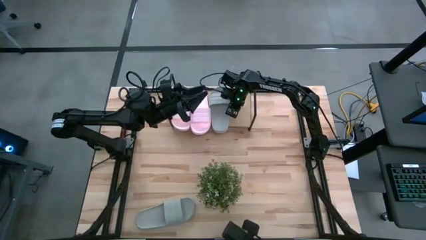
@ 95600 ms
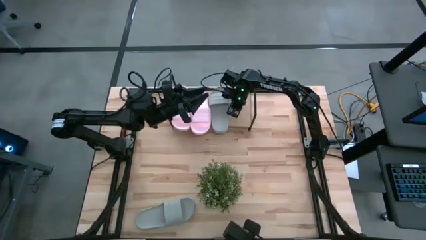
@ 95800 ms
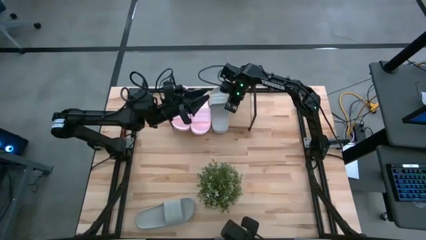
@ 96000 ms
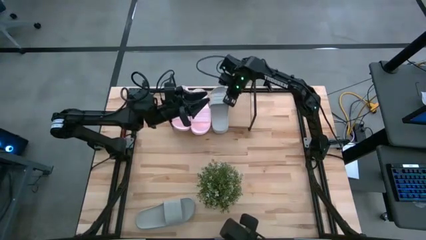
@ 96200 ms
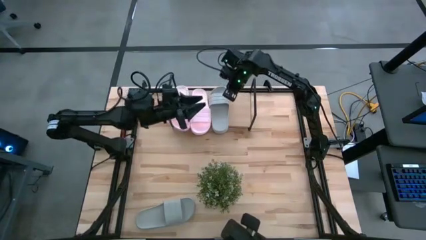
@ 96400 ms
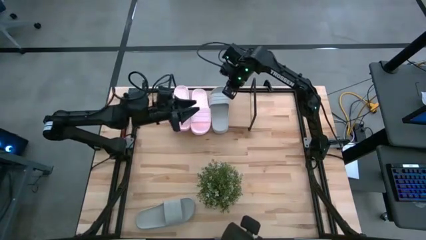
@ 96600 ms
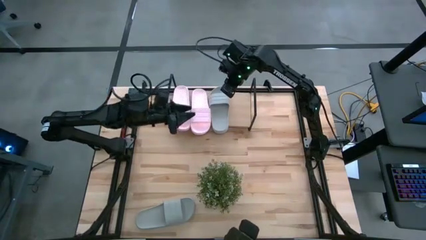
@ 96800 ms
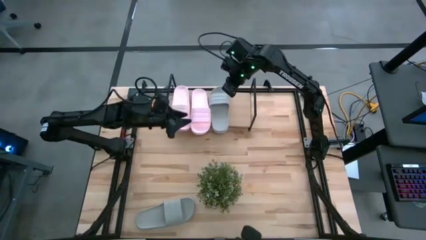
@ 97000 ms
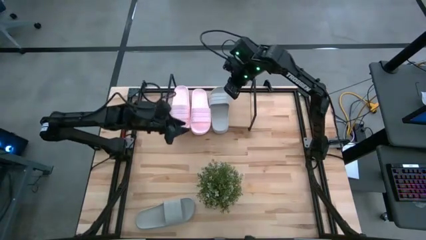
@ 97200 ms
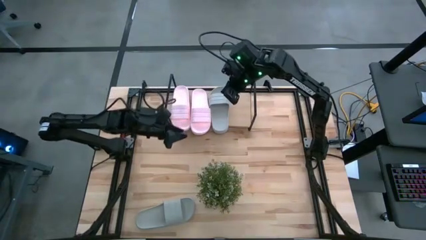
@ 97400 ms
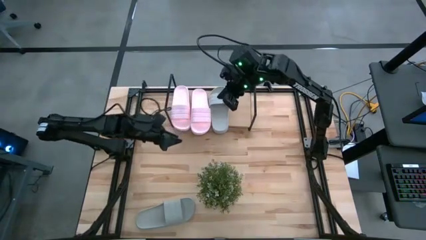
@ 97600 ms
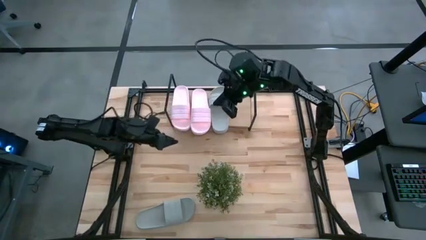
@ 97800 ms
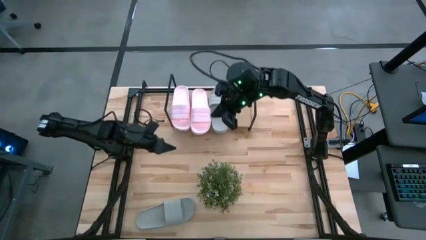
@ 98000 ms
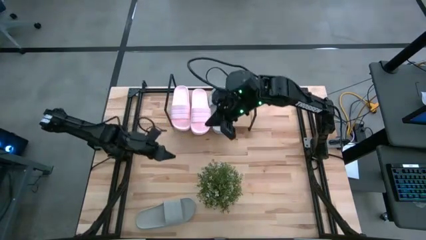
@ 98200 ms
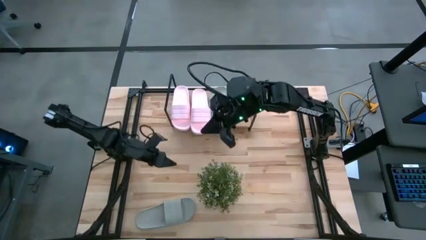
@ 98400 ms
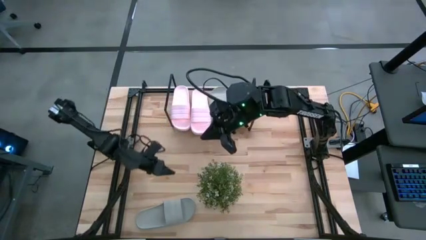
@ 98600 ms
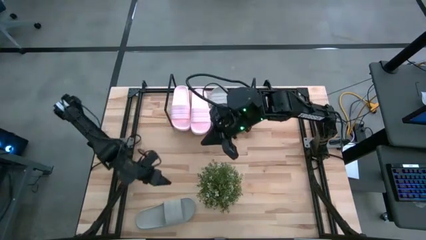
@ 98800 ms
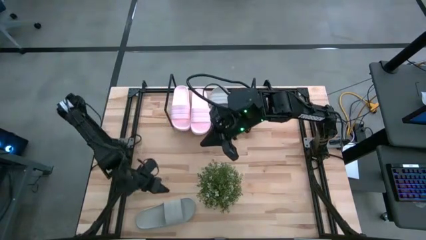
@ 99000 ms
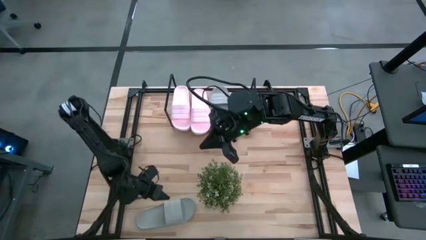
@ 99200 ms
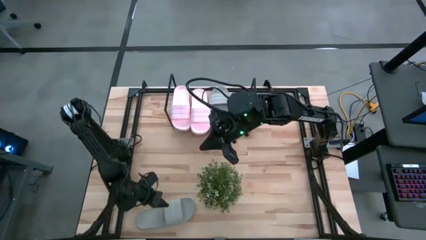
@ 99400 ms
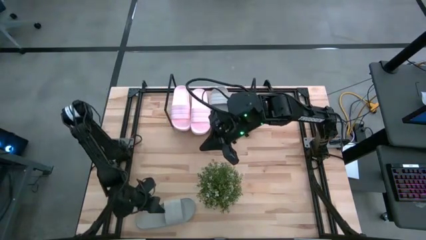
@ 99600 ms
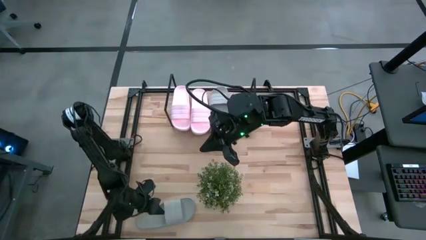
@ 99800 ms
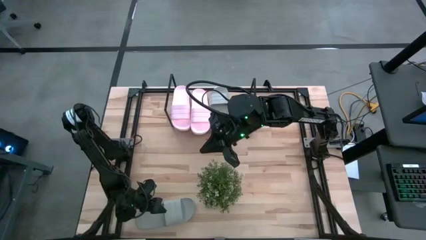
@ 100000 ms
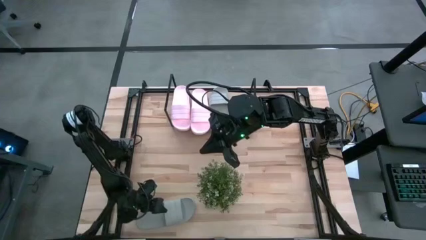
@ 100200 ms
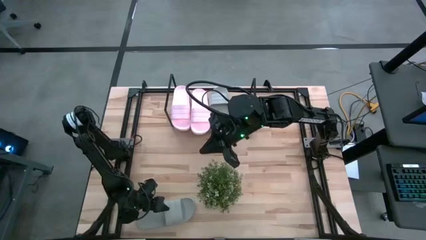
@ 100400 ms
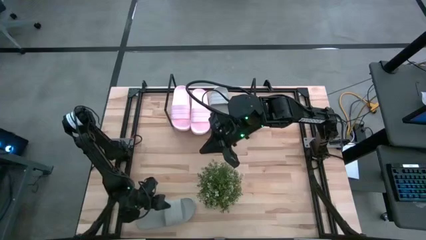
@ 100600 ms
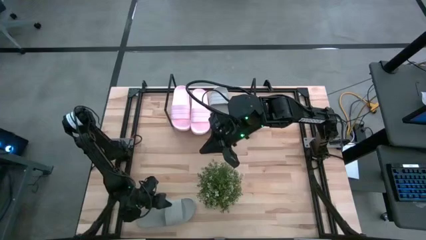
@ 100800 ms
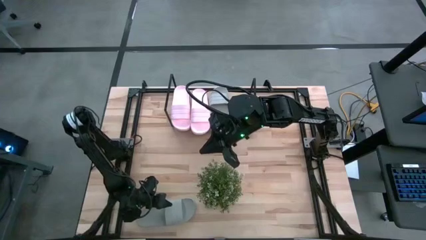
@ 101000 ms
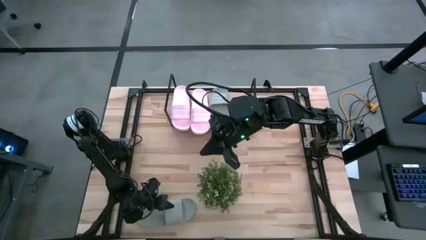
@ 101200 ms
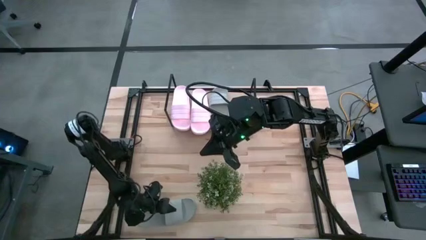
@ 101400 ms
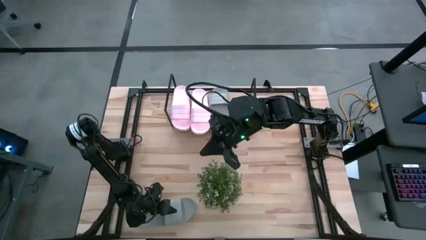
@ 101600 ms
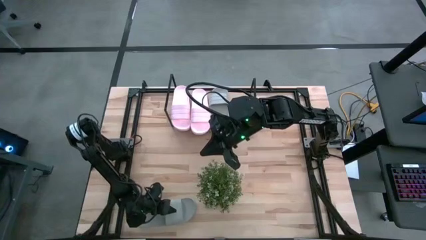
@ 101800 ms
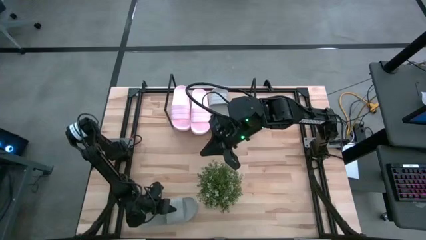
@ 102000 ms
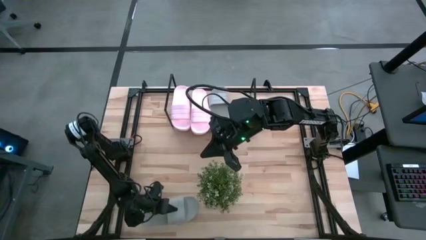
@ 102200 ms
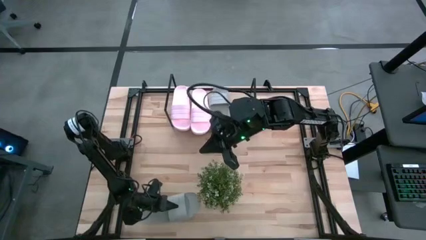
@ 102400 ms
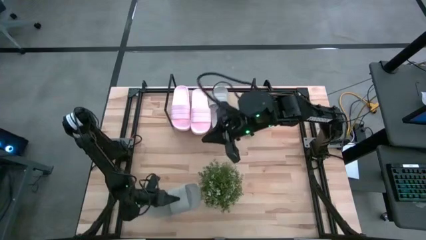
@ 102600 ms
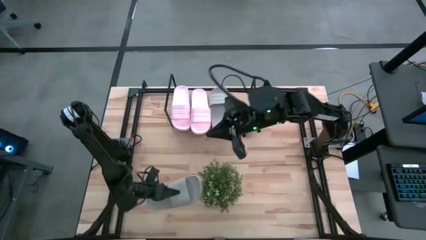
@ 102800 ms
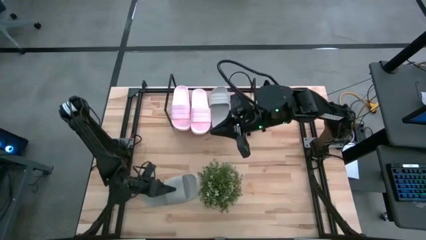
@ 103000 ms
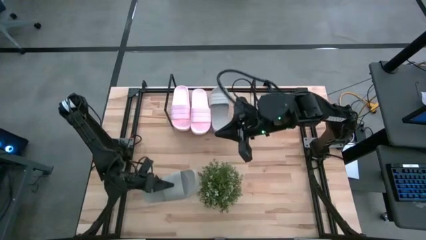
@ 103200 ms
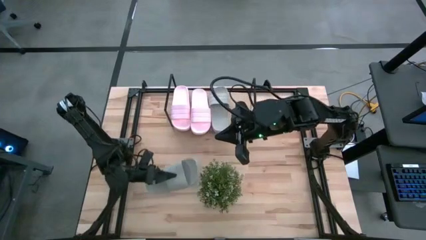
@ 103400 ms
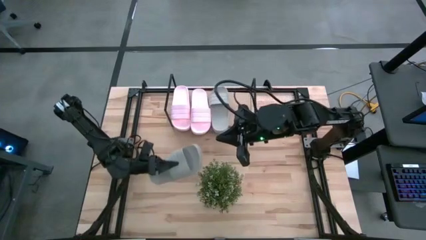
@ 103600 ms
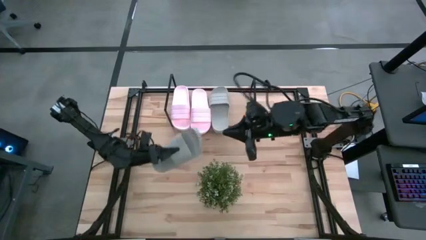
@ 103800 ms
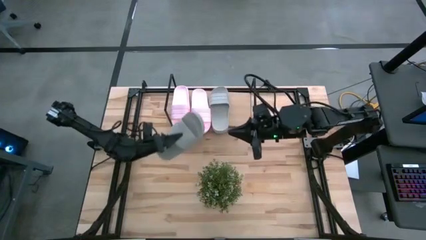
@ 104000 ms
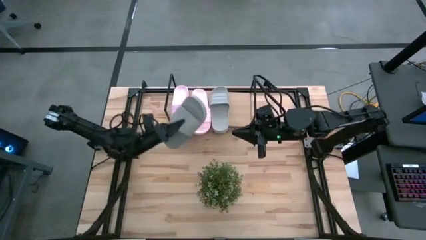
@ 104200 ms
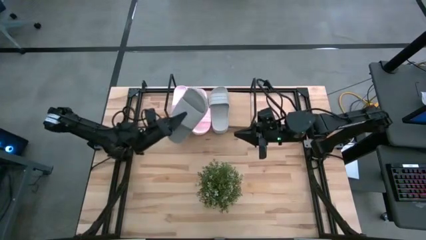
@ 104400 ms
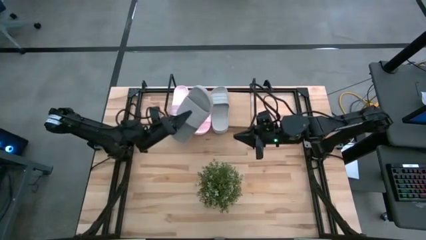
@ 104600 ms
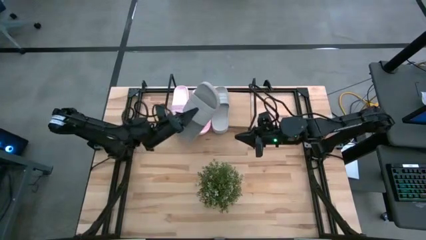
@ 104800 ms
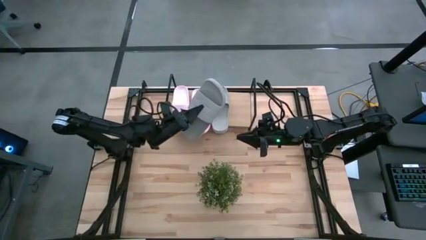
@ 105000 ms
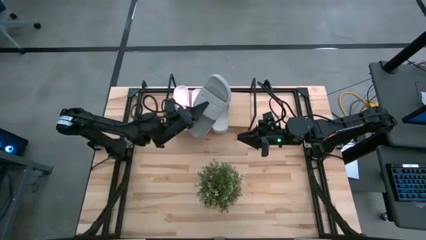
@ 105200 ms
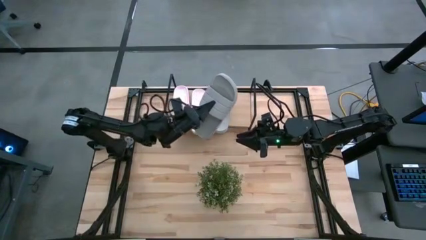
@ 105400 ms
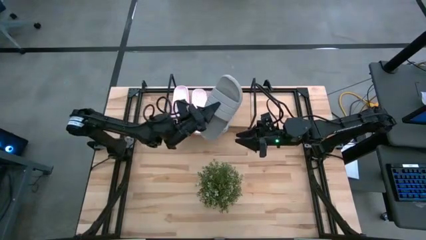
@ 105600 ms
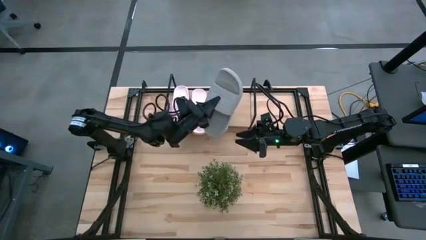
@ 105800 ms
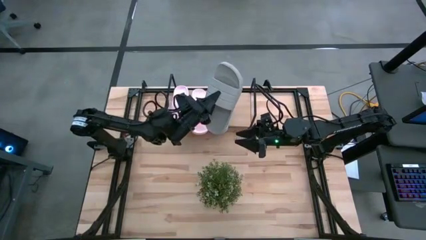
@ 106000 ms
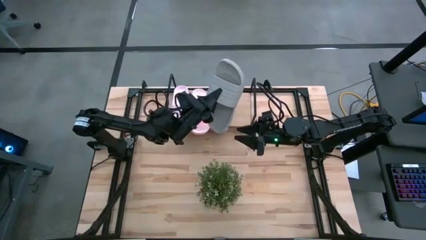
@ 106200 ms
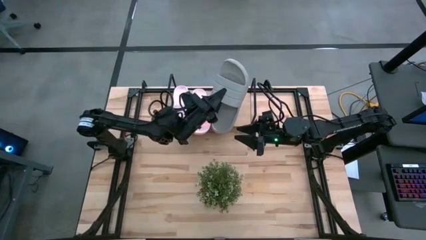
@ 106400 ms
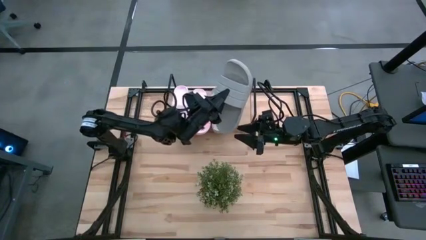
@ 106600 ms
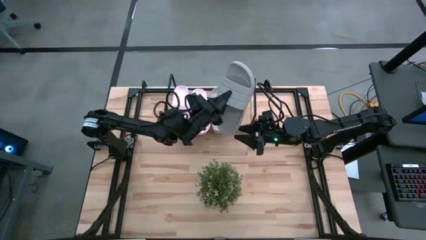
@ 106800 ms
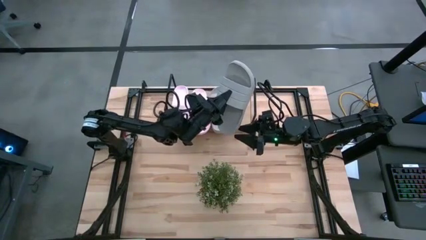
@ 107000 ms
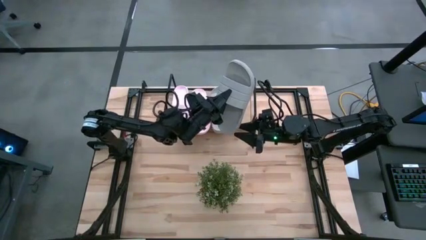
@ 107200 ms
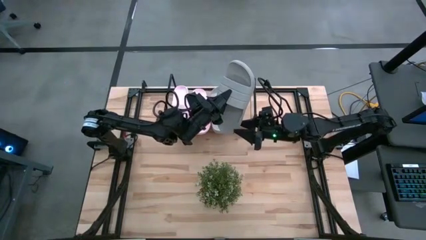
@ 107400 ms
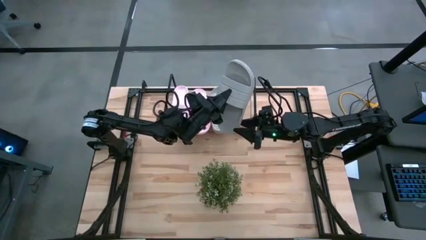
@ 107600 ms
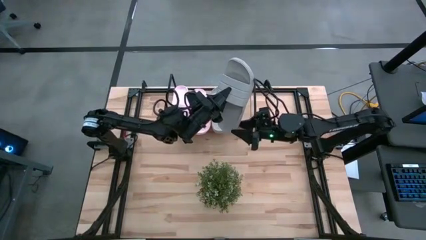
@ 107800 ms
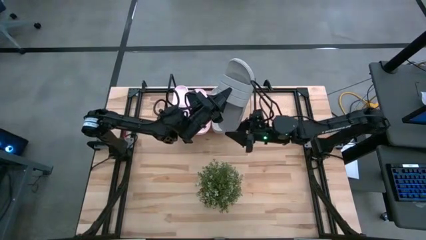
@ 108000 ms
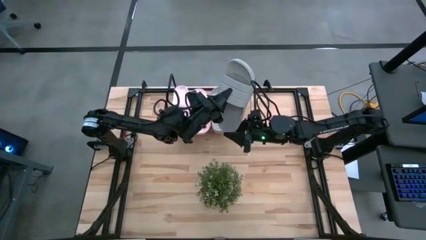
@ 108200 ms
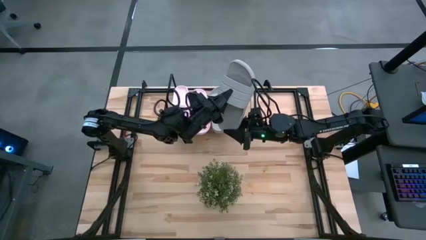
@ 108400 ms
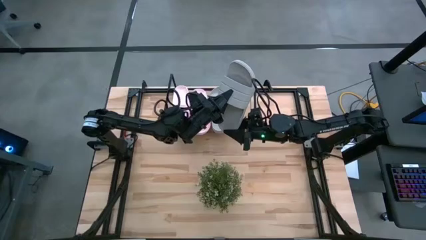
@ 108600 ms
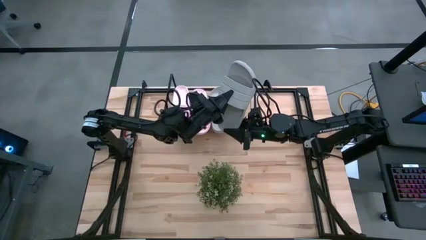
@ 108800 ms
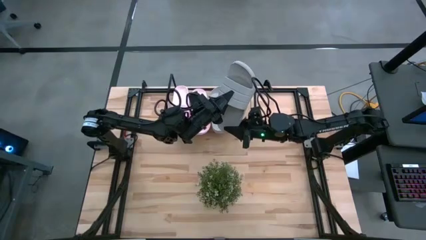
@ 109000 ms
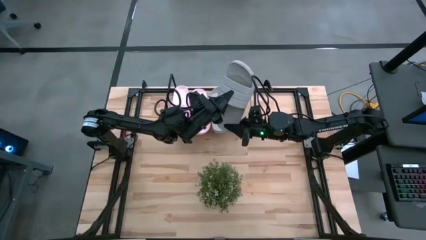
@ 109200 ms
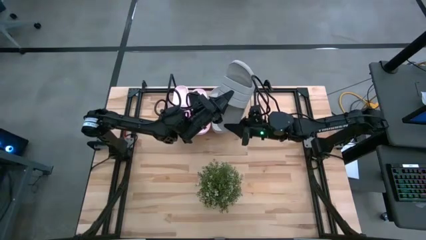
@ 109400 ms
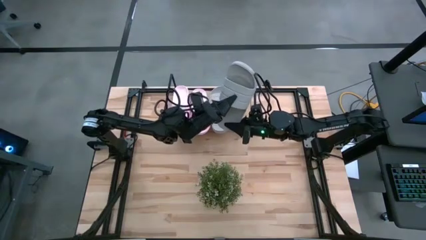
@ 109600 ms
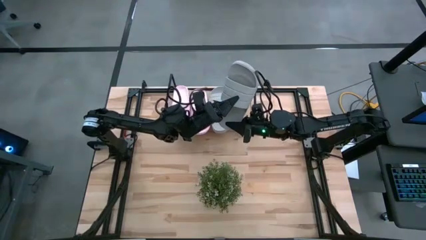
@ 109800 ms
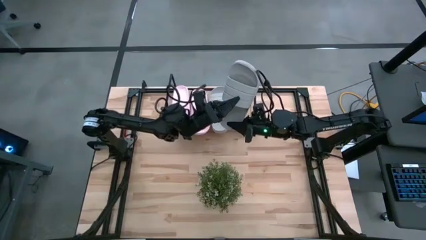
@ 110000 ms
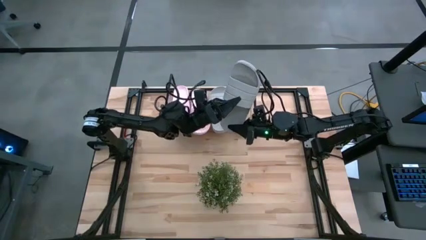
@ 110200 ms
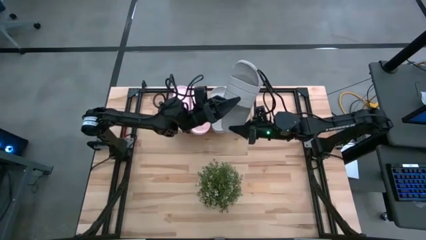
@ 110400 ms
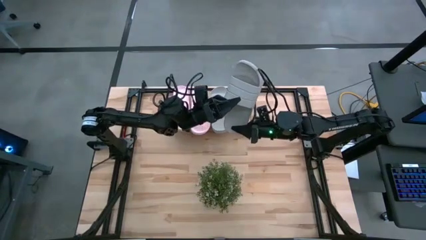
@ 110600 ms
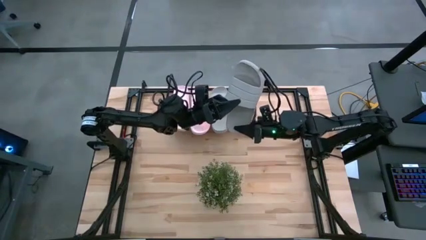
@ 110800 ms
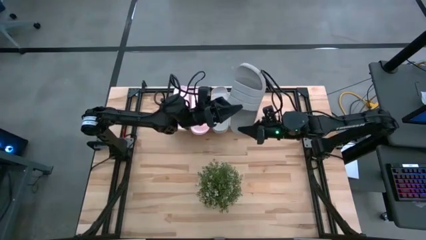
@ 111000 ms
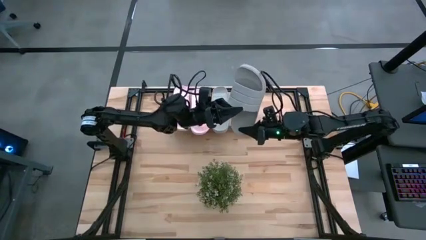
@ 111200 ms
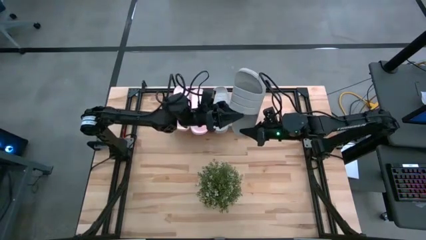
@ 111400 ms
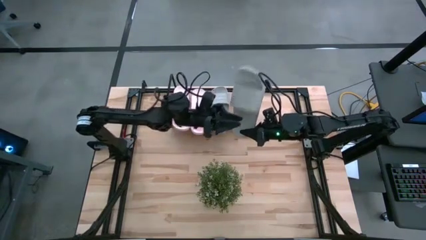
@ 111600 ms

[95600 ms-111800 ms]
Task: Pick and place slides into the shelf
Put the gray slide on the shelf

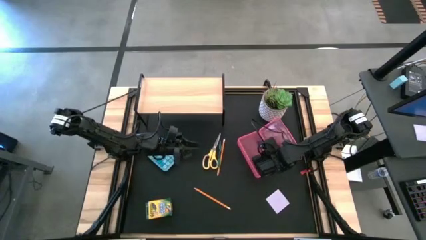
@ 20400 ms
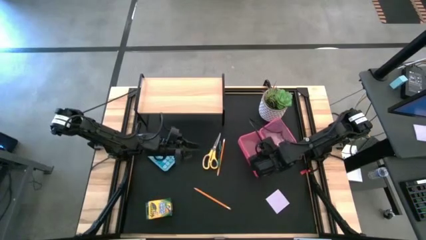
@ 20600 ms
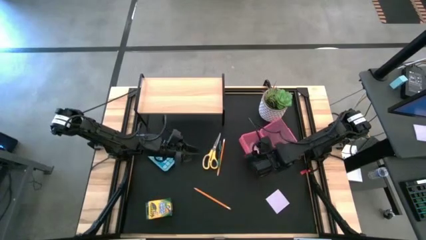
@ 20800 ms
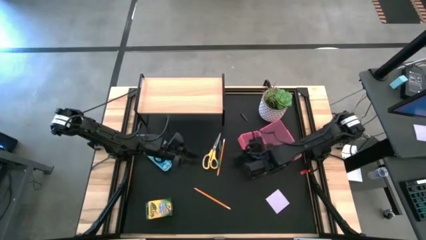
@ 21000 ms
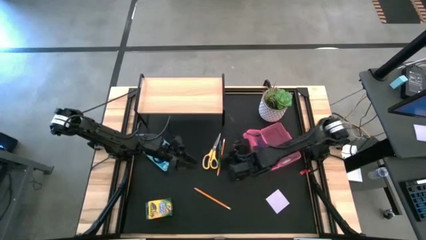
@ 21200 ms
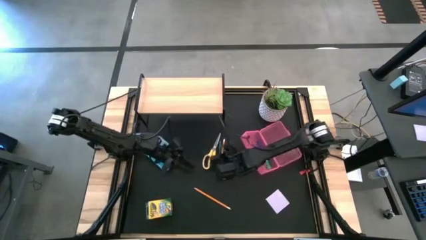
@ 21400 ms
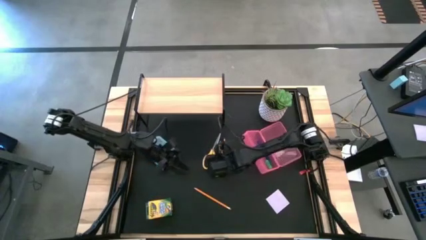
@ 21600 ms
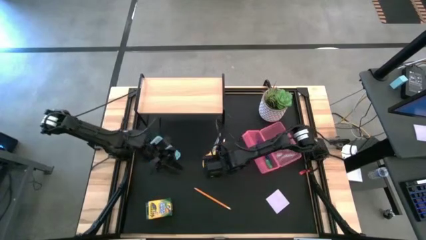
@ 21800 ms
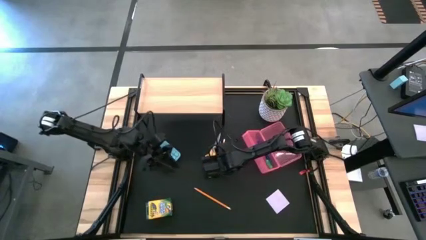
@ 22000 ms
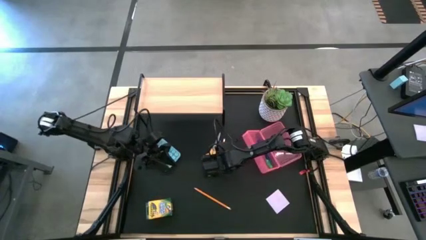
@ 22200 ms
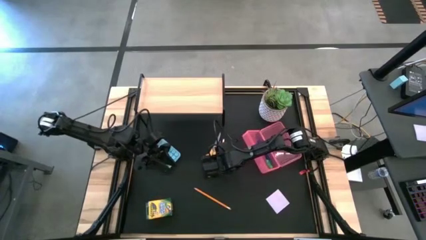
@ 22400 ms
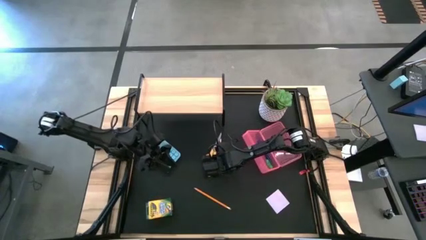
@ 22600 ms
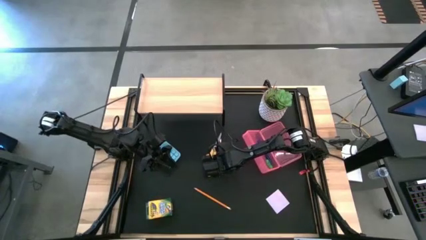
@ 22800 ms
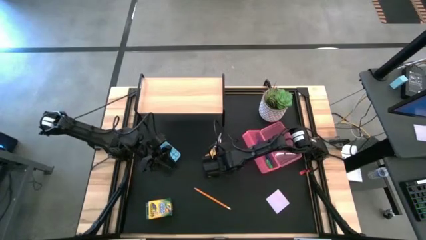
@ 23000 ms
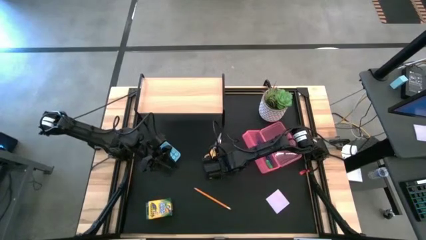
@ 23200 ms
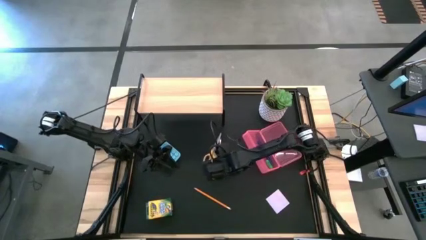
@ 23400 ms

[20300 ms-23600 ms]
Task: Pack school essentials
Put the green pen into the pink supply box
